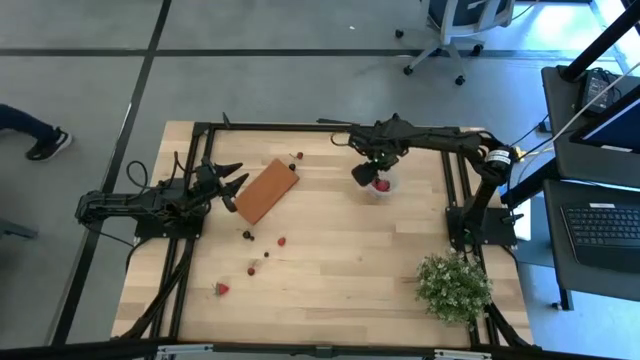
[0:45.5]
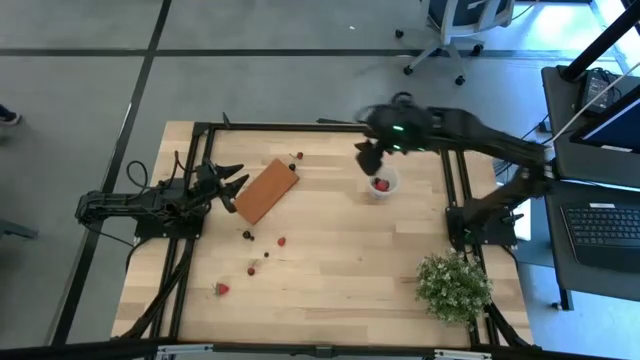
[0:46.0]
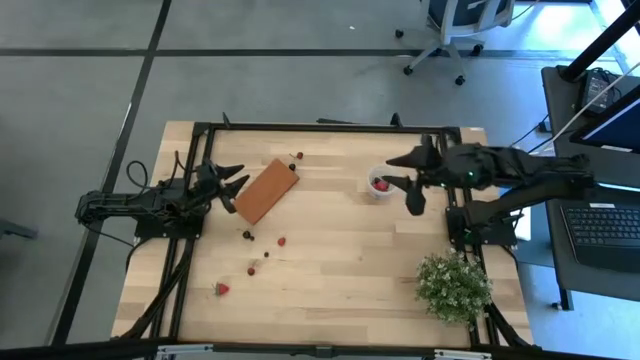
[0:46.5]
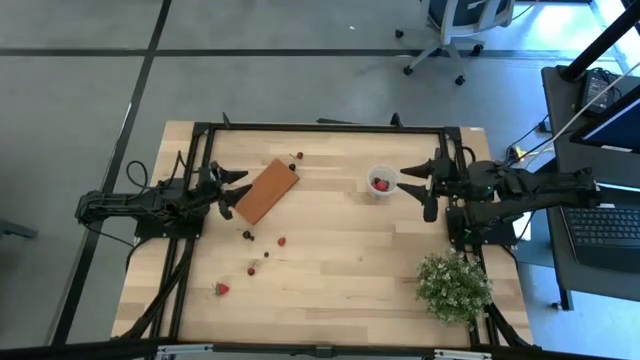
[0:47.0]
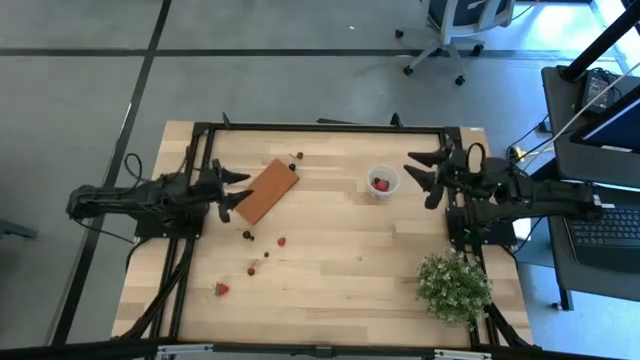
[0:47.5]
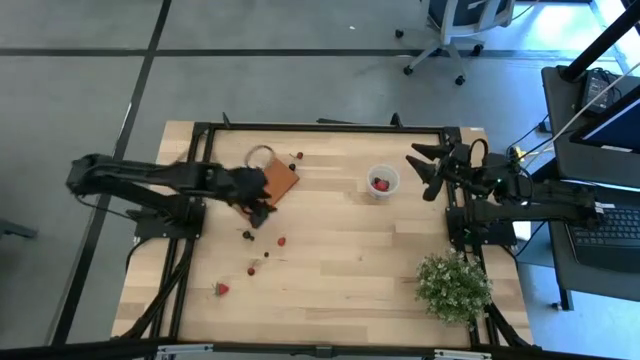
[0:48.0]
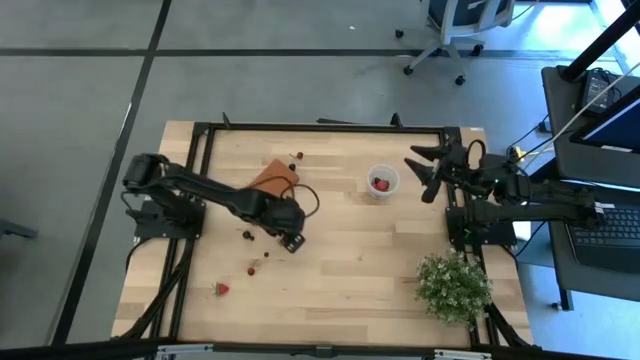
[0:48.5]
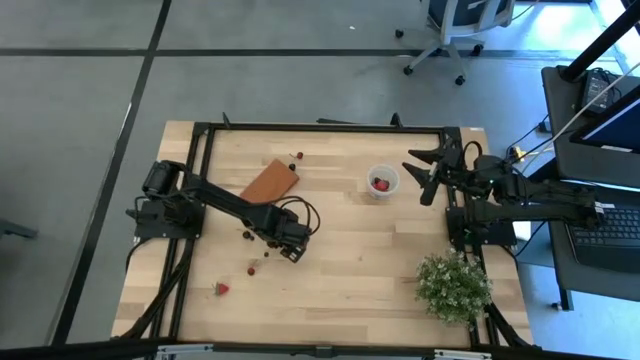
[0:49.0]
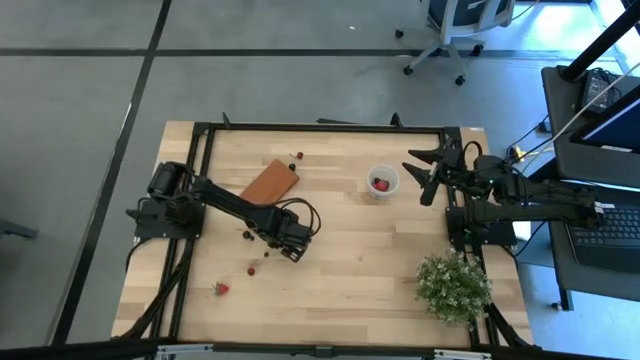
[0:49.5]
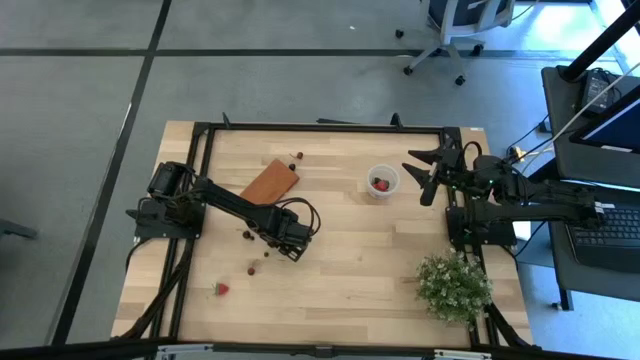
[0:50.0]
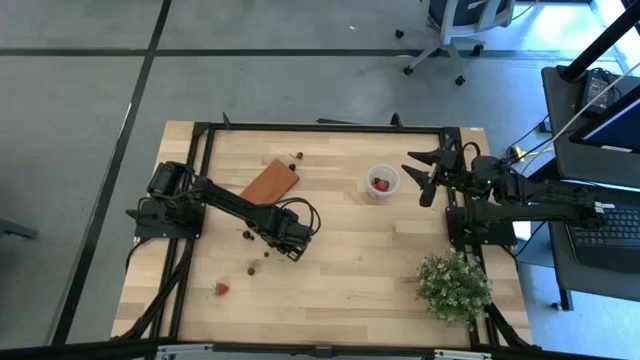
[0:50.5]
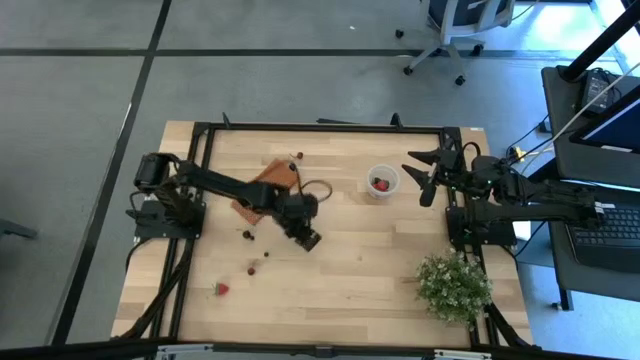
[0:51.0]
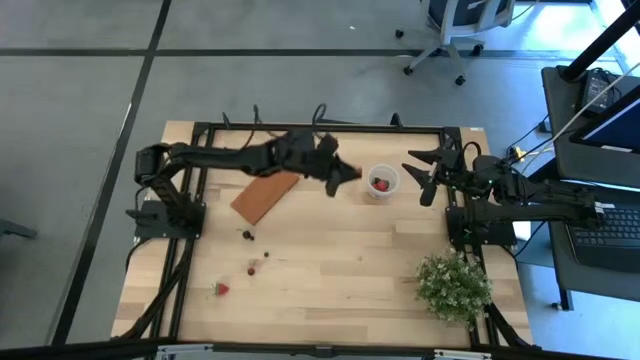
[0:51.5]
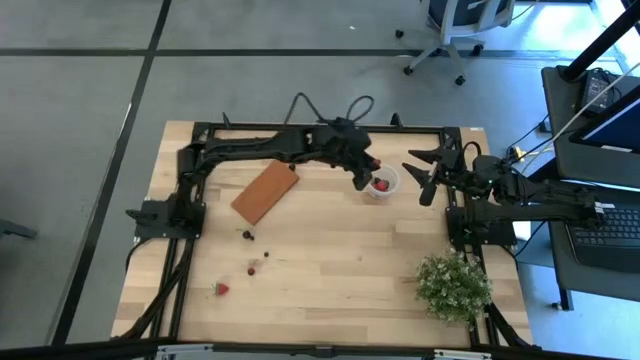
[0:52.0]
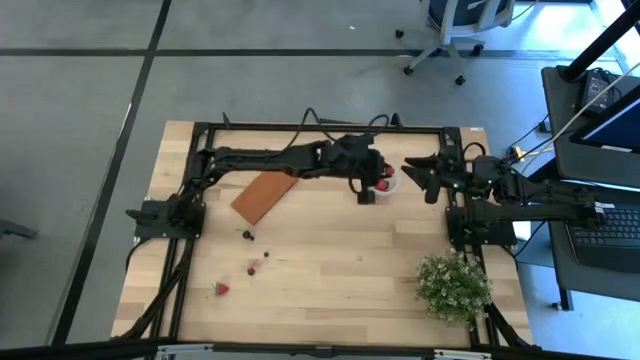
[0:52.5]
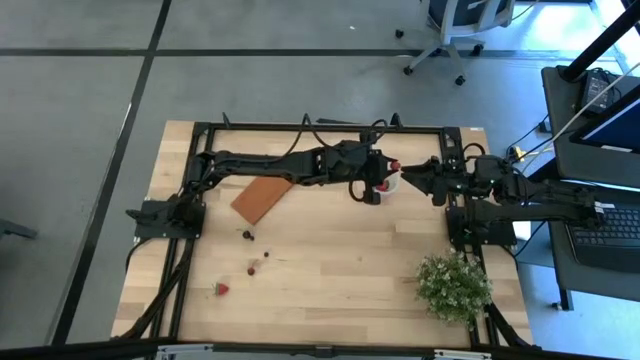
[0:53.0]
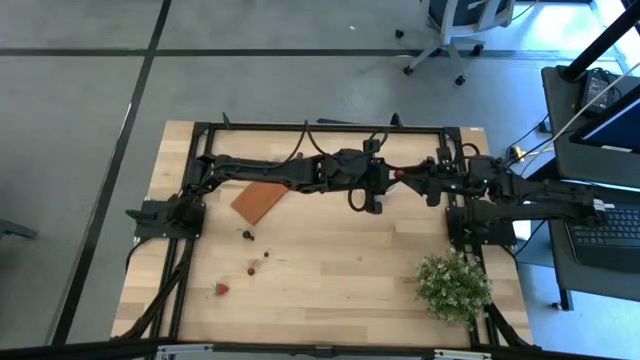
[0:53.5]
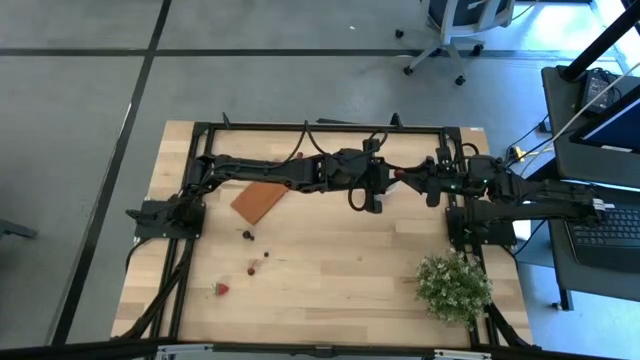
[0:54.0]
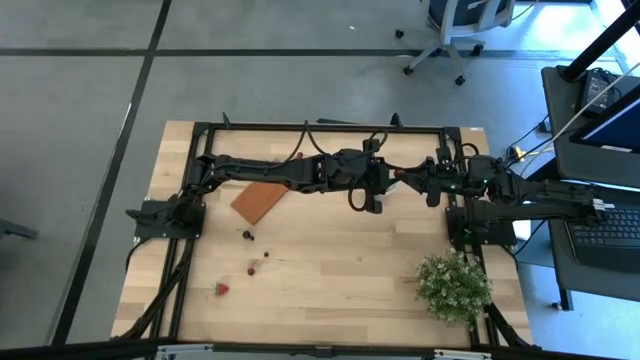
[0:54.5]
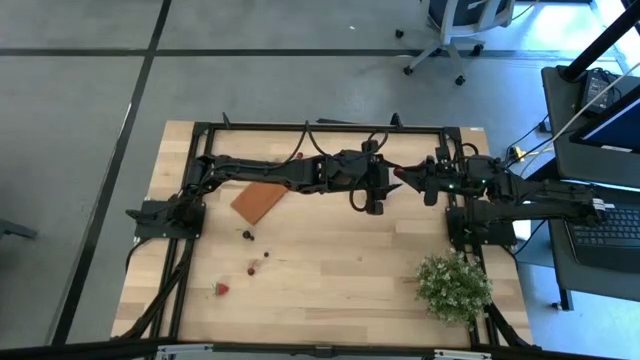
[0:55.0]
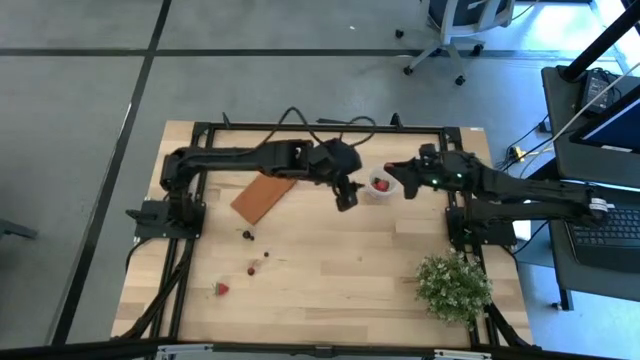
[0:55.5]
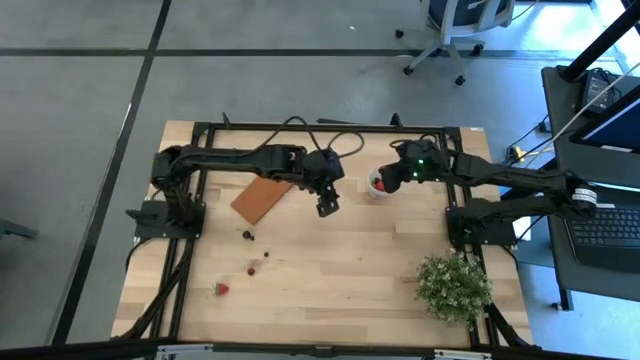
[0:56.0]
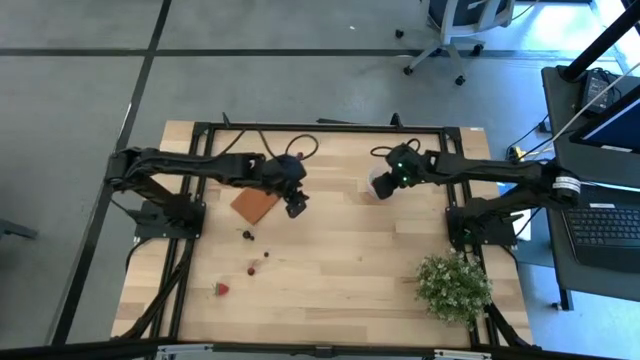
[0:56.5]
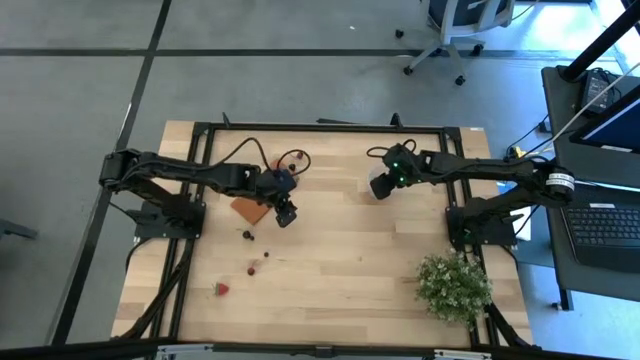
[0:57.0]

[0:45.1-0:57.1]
Task: Pick and placing Produce into tupperware
Put the red raspberry into the transparent container

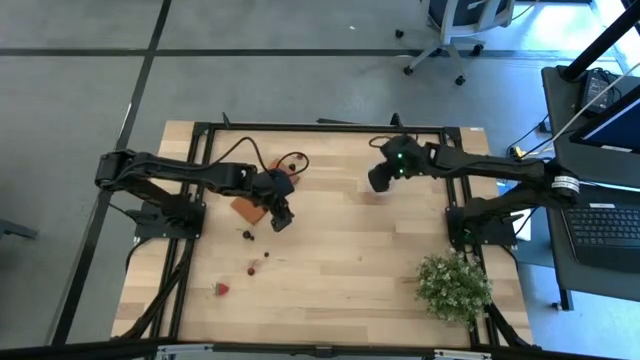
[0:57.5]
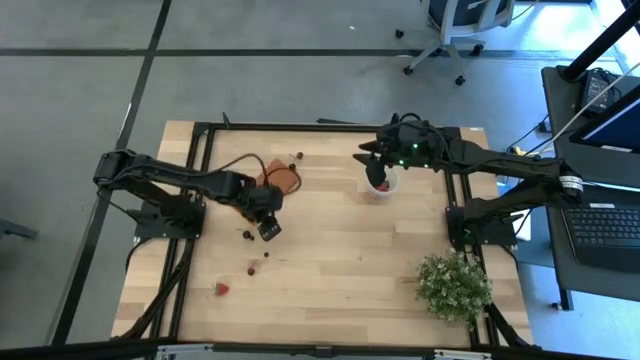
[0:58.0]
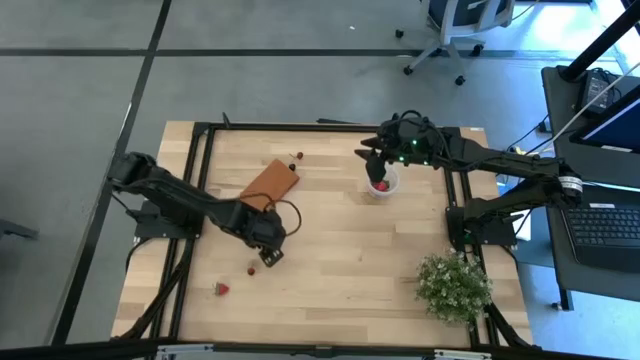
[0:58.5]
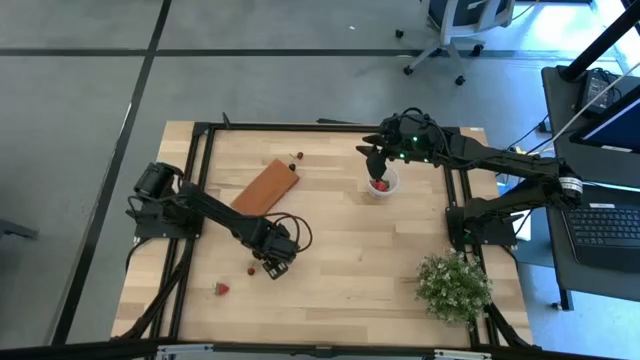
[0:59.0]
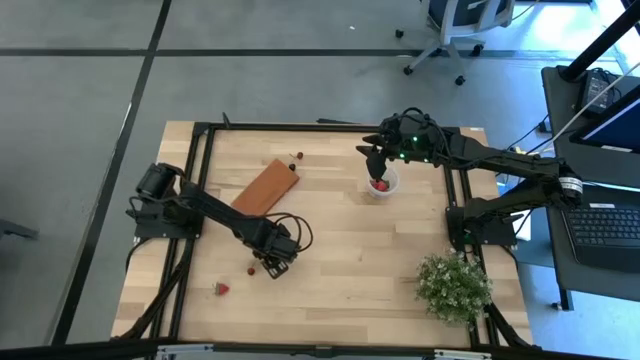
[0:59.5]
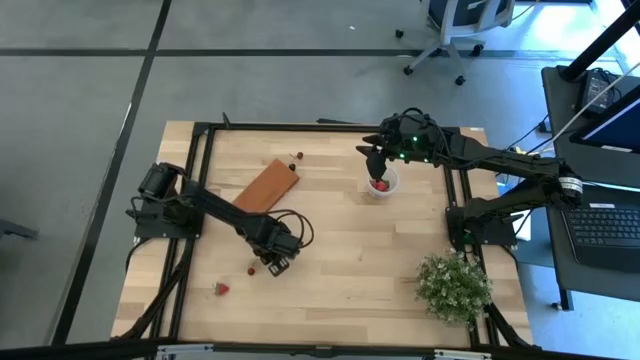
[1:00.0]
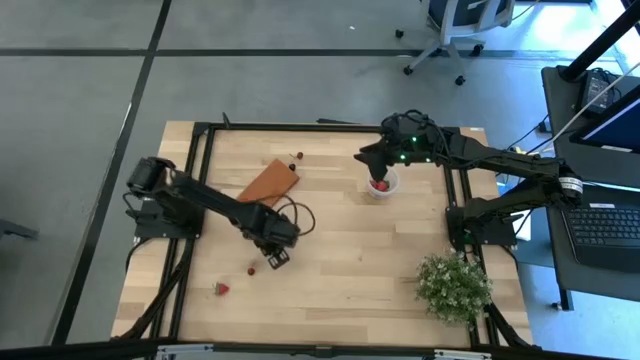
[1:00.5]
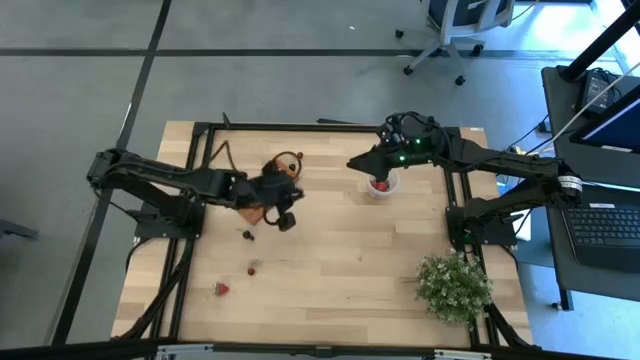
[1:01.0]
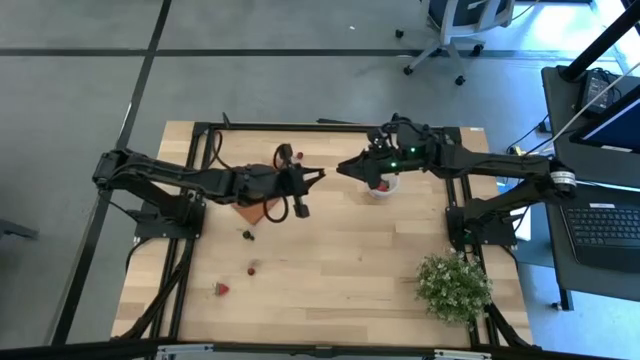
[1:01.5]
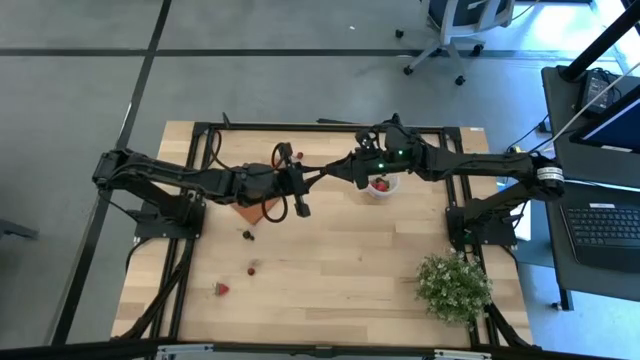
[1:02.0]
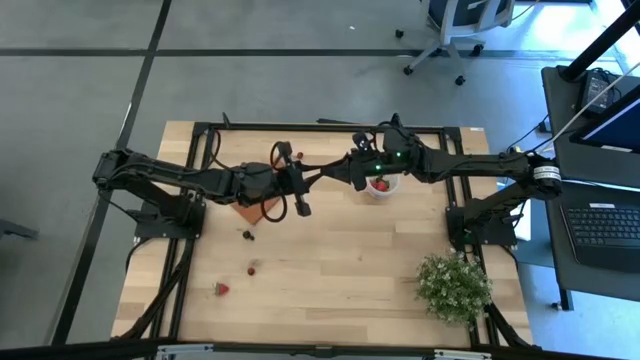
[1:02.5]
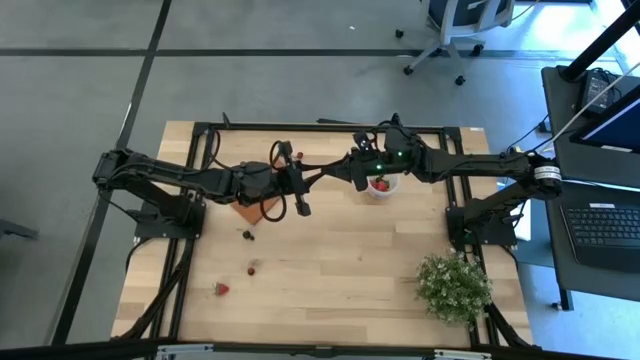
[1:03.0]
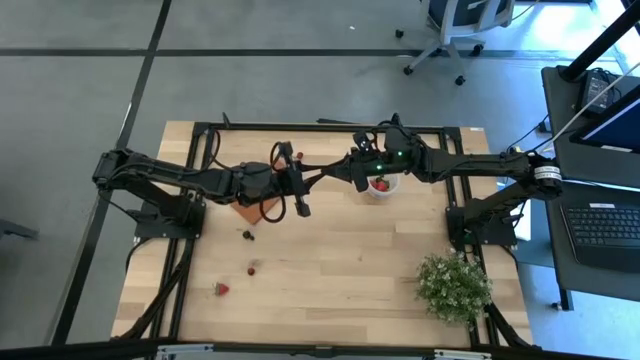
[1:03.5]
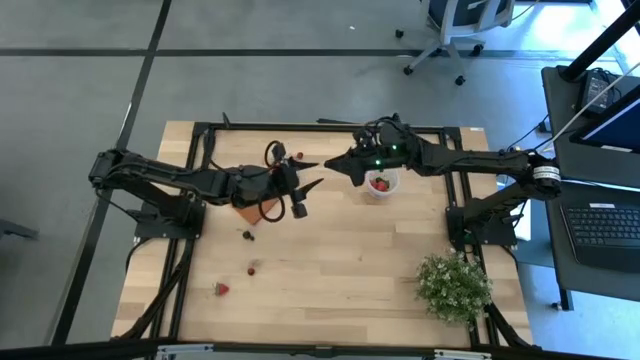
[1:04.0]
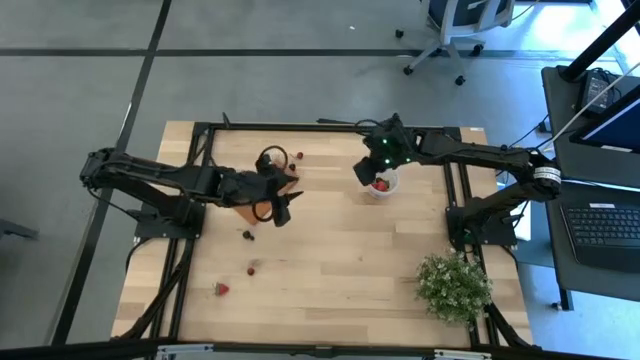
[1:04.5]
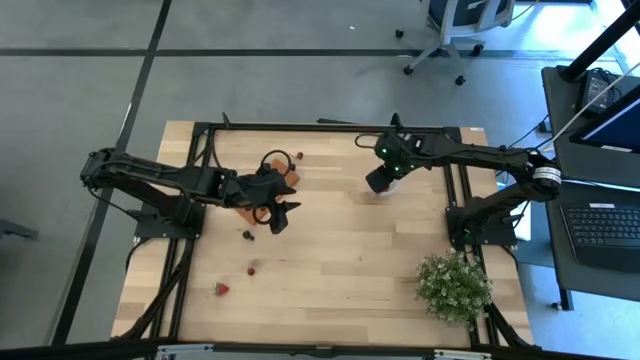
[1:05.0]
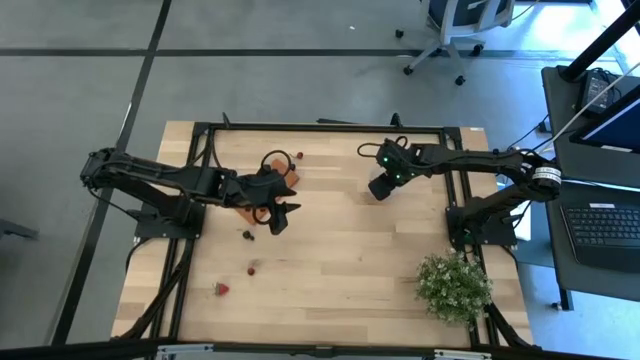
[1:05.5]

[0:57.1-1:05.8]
Put the bottom blueberry into the transparent container
